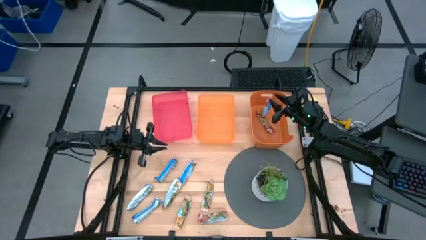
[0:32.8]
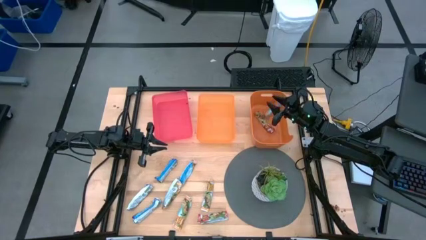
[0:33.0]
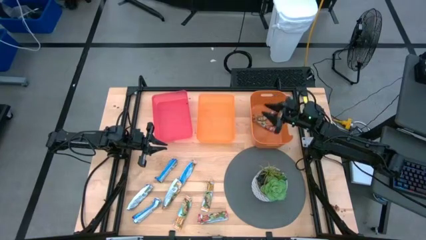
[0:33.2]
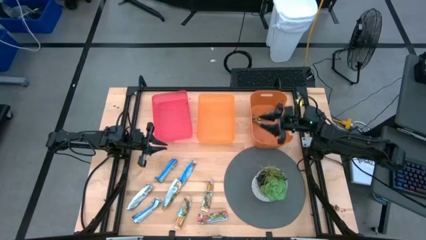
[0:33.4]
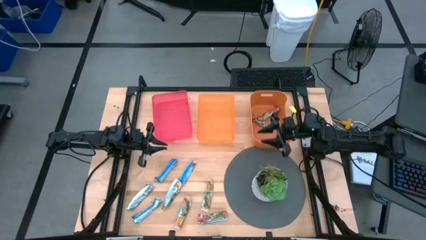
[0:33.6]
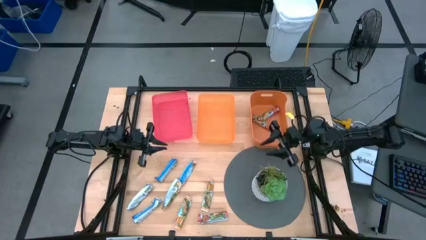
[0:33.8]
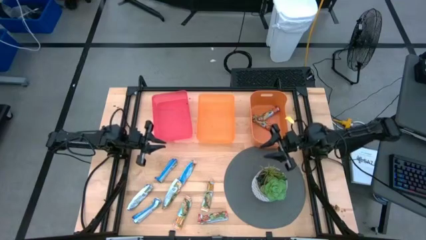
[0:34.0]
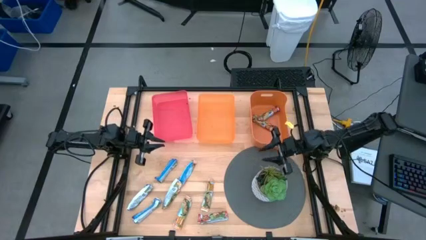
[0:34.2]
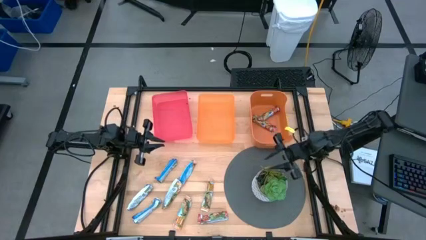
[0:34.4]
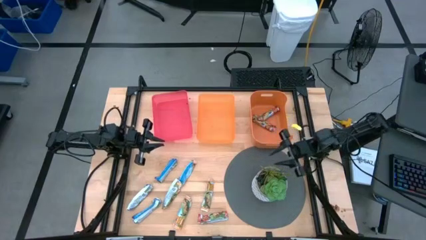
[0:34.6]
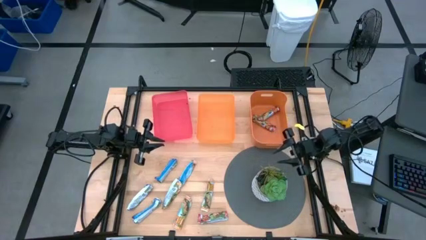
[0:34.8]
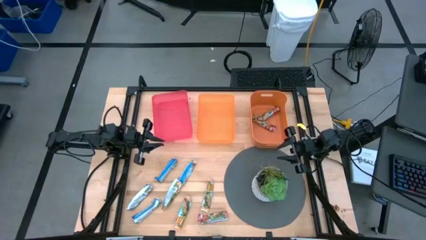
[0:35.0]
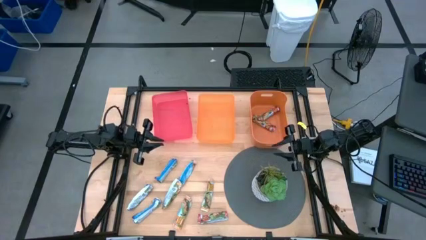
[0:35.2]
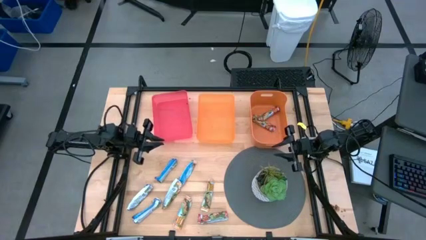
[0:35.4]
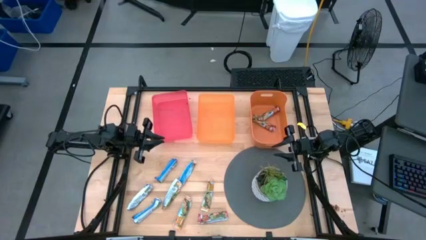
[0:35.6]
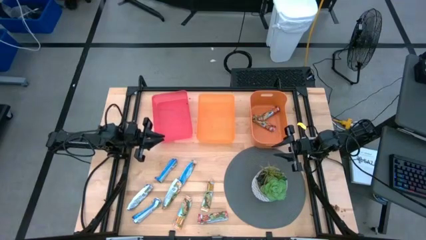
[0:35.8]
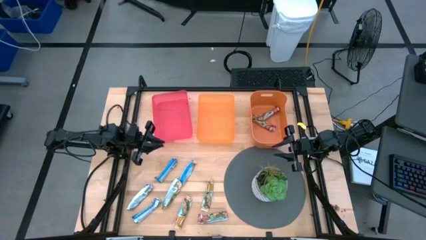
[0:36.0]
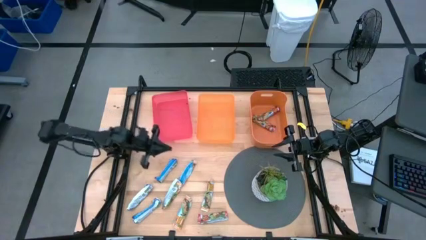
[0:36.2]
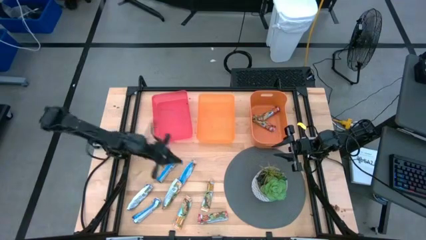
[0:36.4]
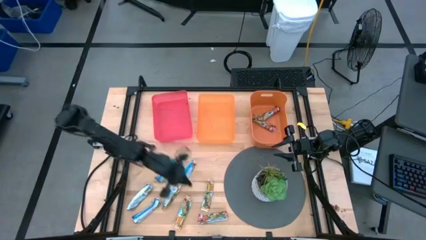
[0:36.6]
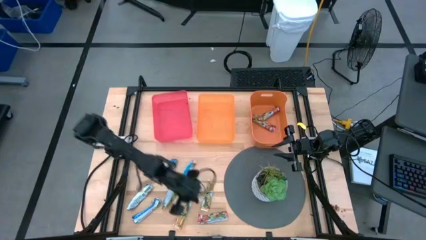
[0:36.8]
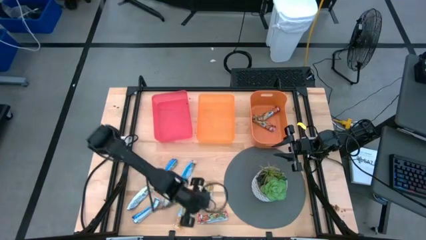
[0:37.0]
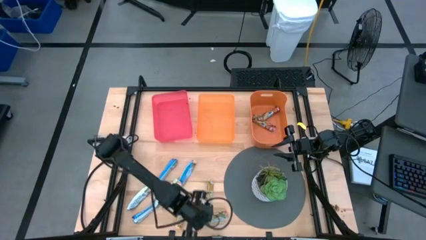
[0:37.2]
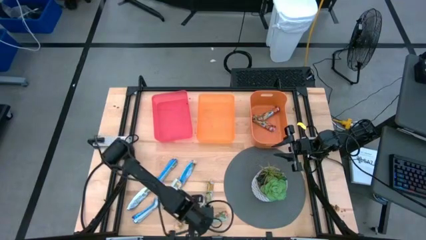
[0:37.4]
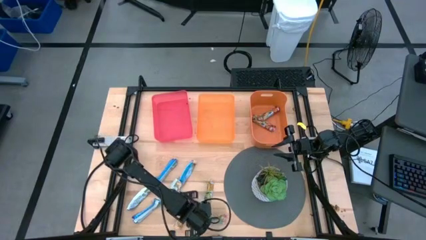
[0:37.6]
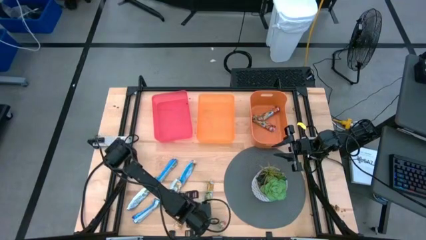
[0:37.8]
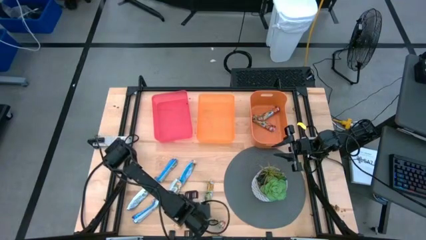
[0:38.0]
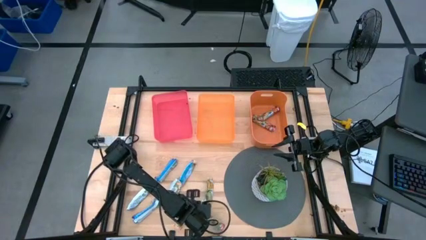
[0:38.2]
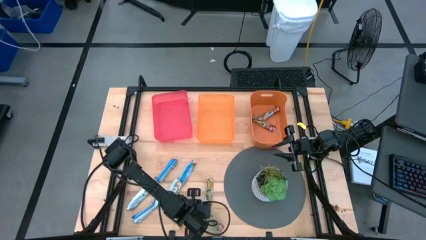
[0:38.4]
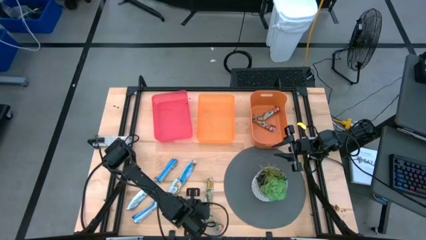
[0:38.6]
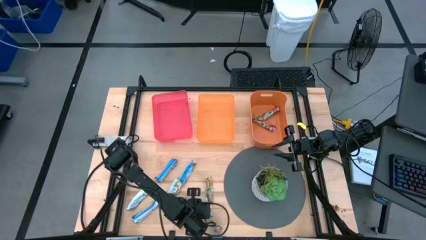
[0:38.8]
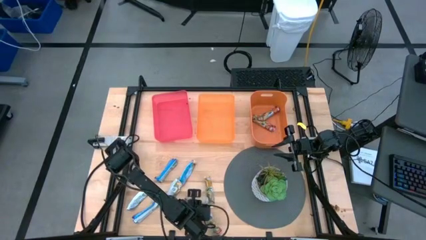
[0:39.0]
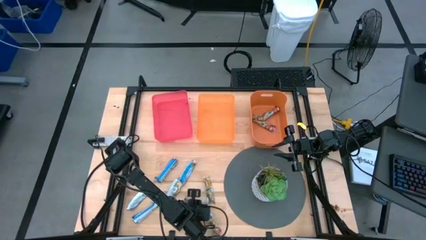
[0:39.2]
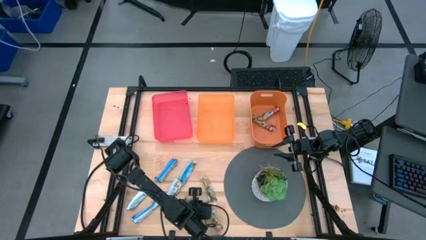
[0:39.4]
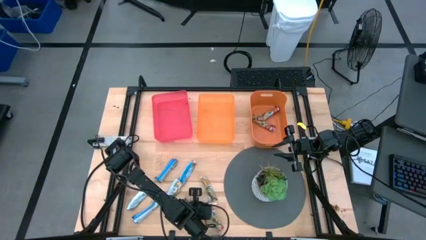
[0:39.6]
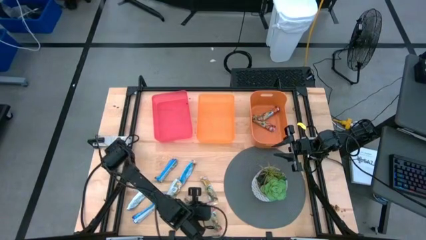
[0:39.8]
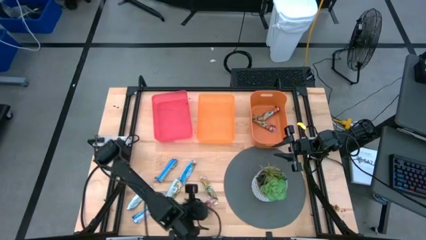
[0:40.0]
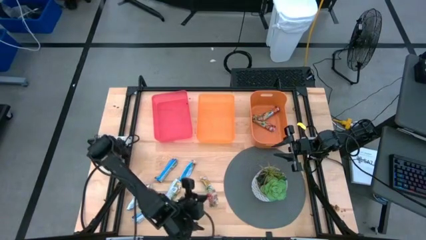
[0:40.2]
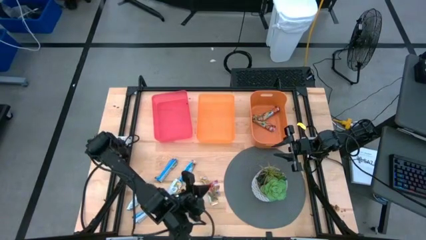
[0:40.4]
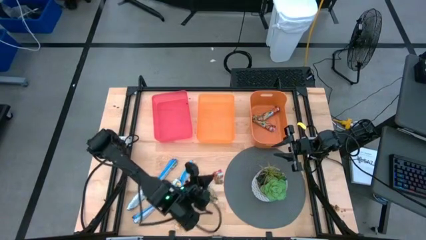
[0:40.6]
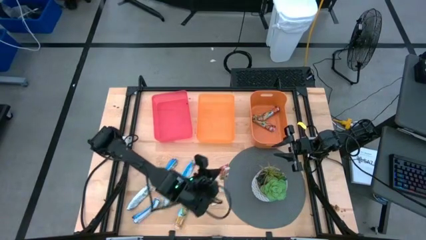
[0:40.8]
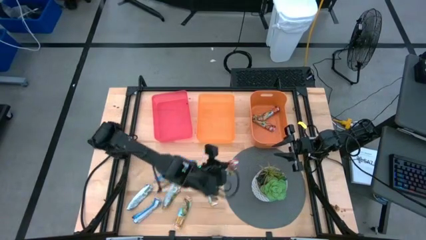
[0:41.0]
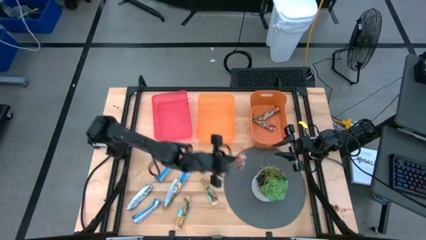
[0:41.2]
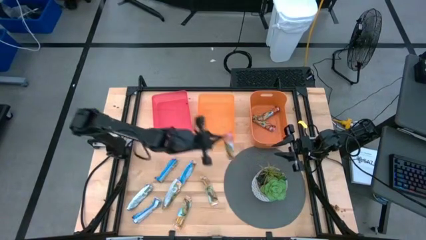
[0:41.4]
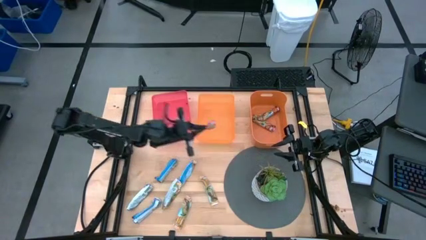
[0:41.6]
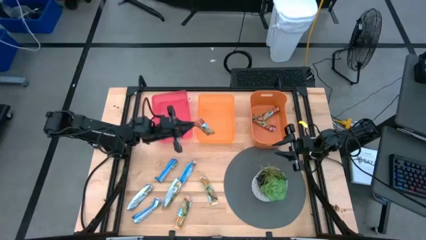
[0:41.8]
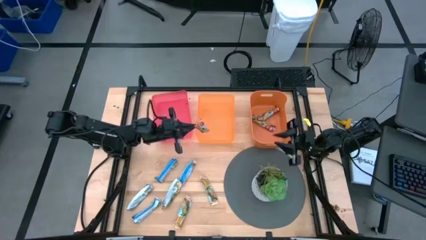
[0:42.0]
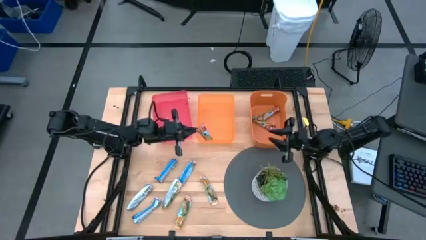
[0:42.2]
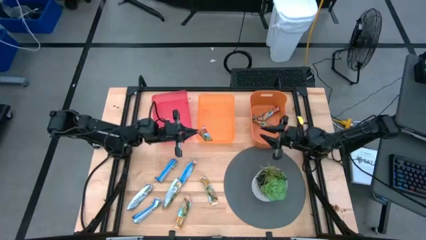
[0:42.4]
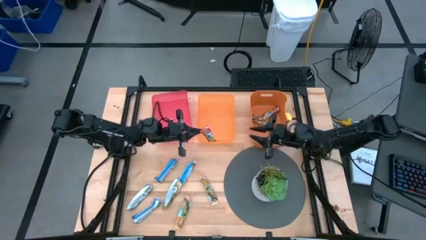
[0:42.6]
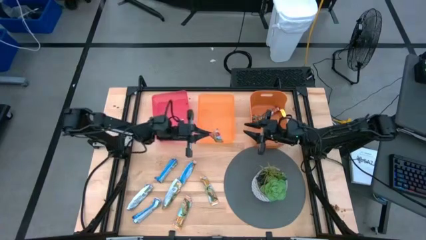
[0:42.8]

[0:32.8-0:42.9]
Task: Pick and place Granola Bars by type
Put the red granola bar into the right orange bin

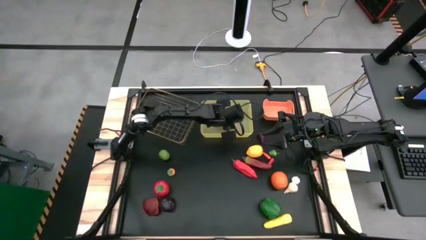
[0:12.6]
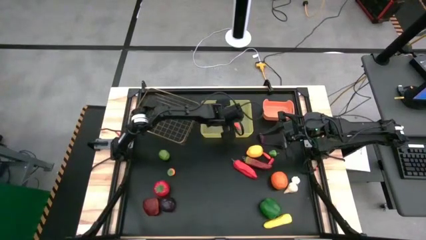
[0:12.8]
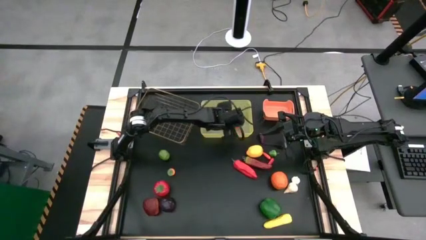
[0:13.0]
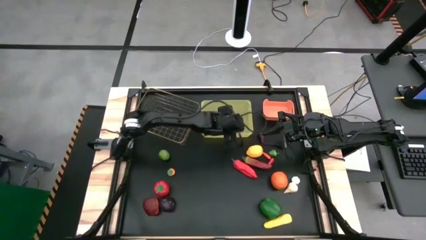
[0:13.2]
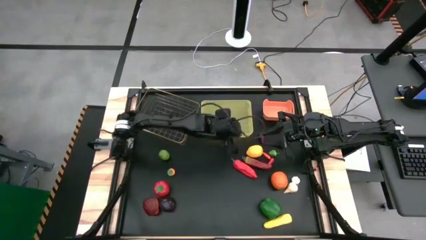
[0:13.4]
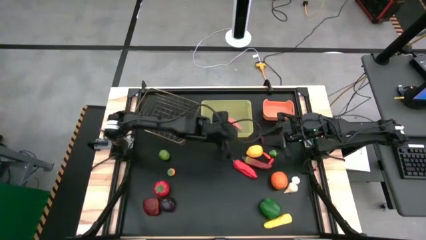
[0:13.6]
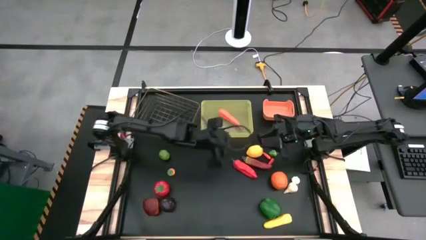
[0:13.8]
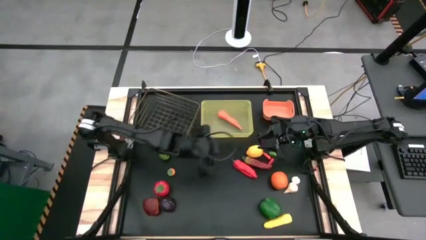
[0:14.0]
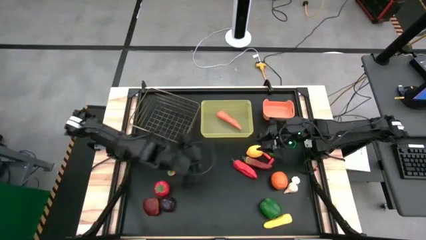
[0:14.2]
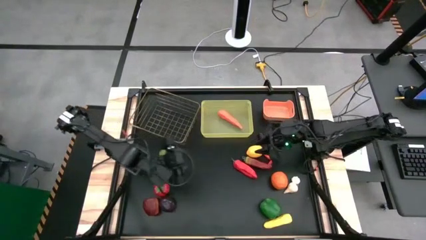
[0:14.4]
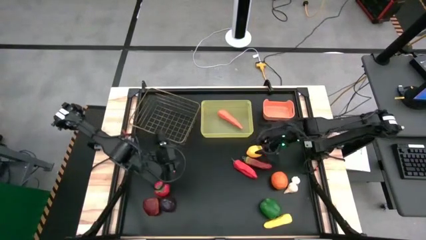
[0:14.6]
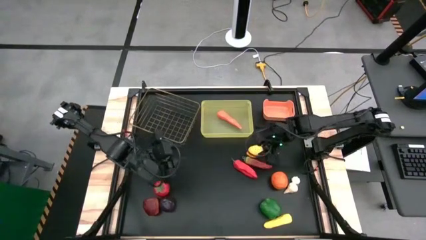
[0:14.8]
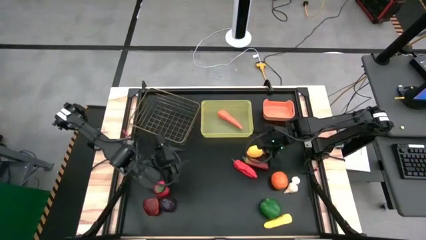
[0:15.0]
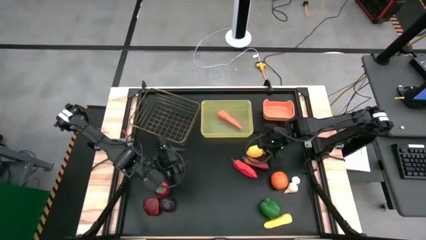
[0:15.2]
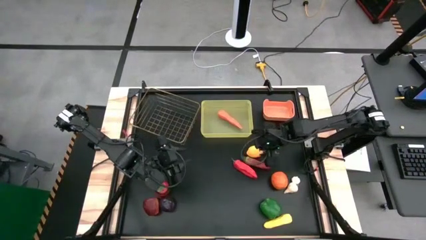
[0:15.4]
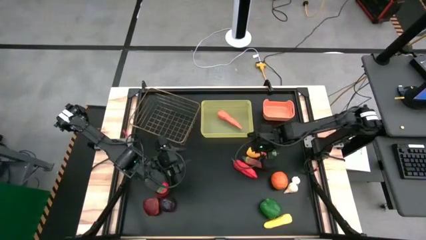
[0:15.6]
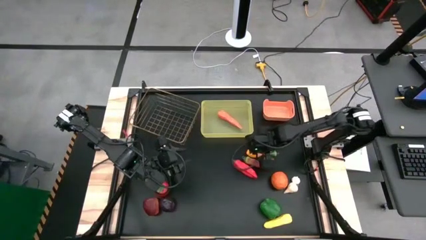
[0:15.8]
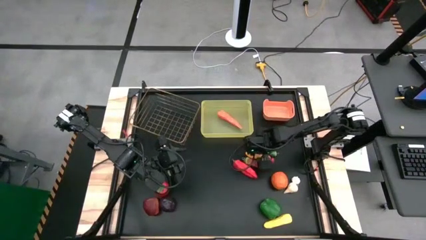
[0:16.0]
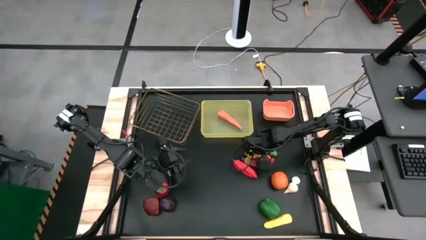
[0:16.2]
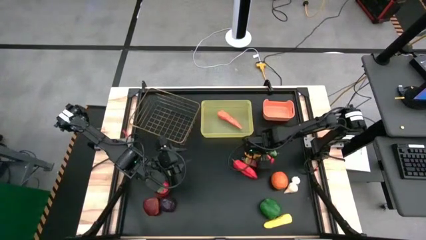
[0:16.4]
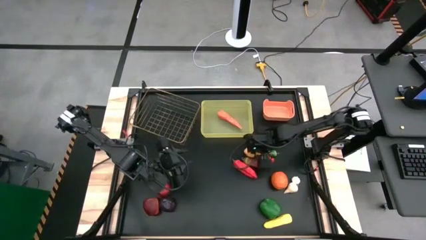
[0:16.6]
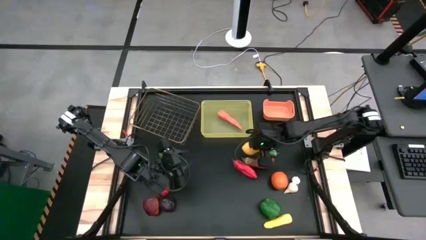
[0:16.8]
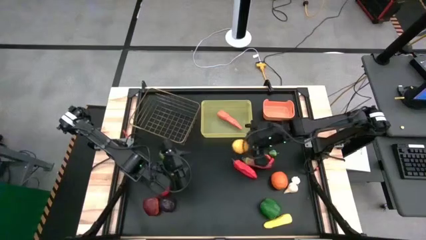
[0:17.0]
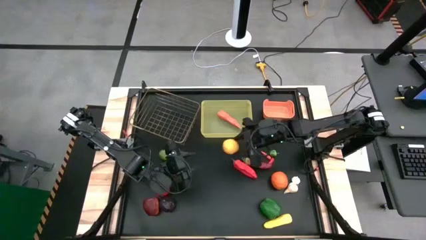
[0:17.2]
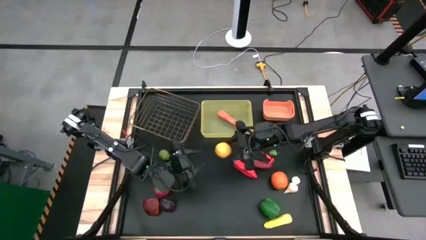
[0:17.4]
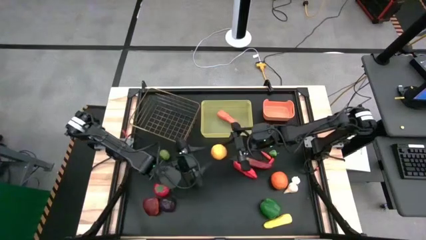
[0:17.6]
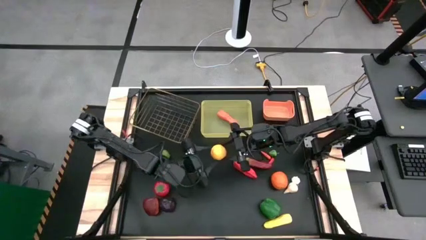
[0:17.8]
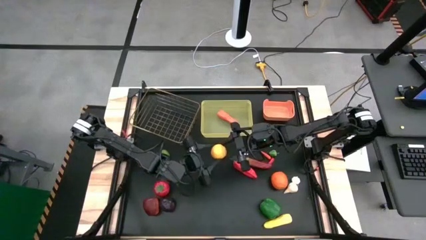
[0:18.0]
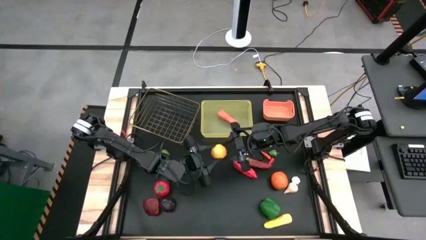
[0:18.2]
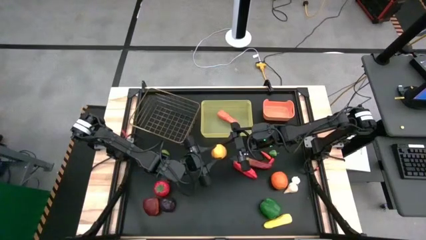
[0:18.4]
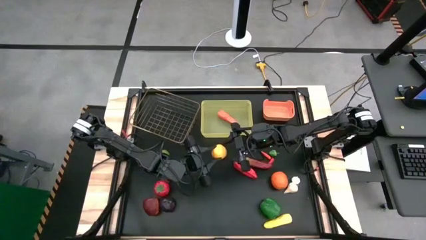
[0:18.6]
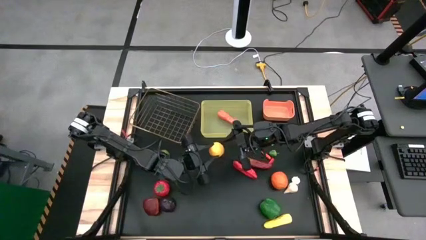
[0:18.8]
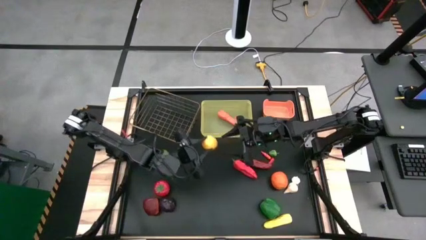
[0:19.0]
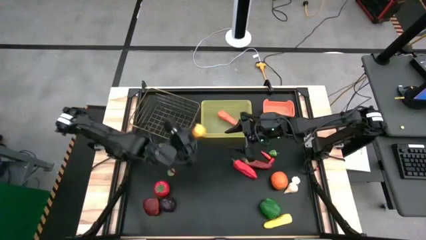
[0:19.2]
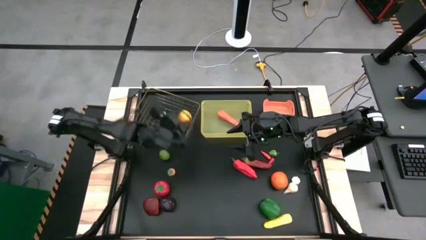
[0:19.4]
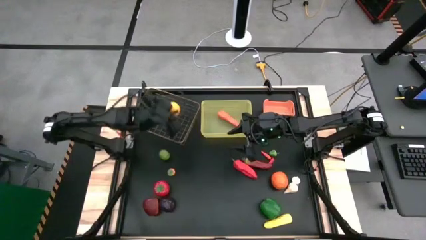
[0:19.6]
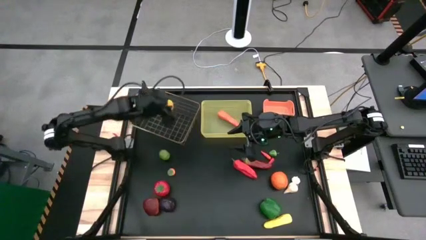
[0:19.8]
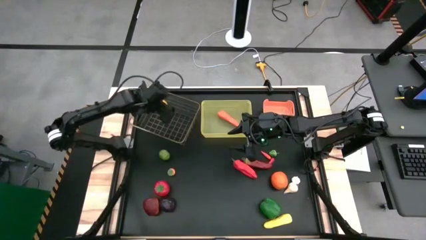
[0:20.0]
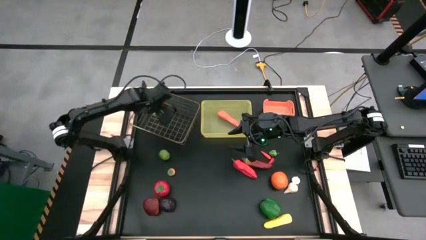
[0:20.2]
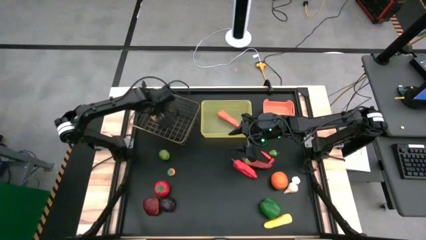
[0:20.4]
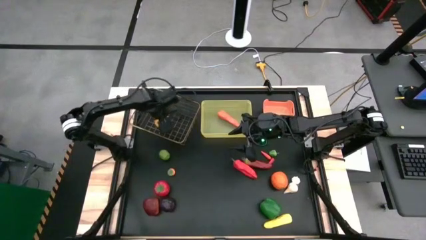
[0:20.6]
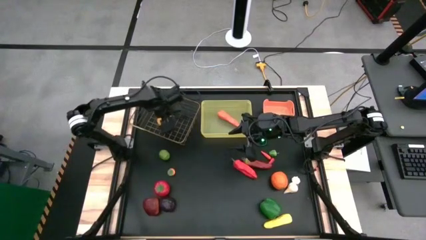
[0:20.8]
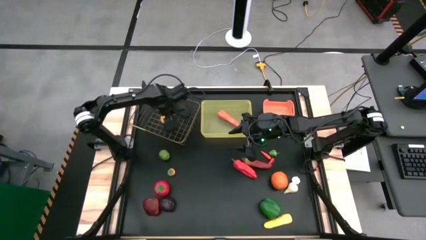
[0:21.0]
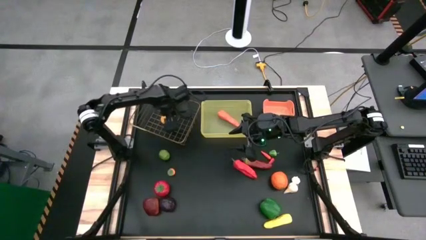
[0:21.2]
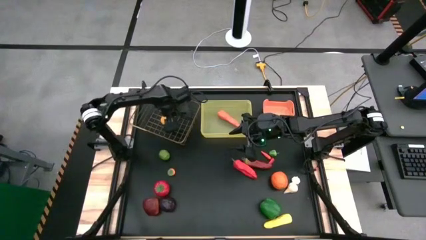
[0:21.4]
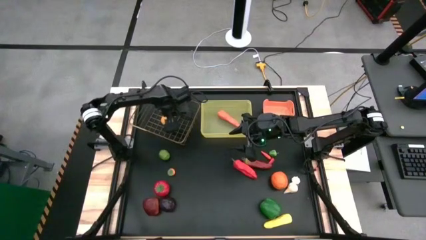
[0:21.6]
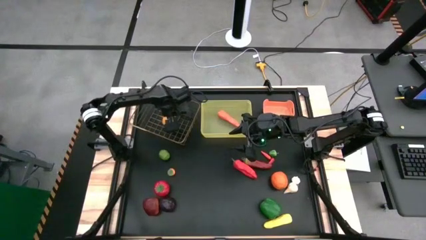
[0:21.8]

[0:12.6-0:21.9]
Task: Sort produce into baskets
Put the lemon into the wire bin
